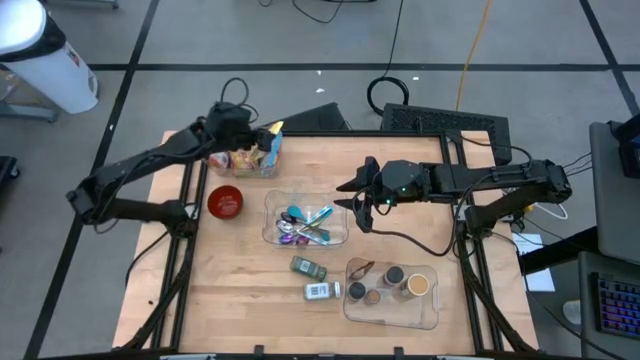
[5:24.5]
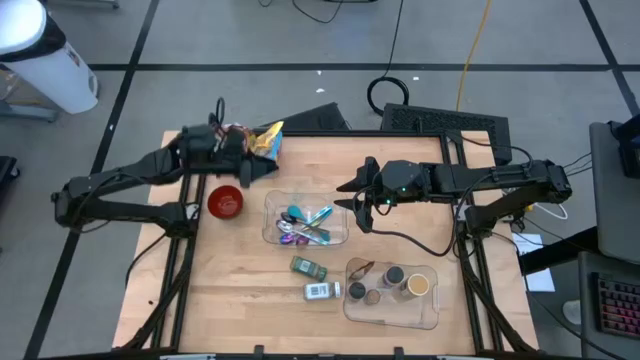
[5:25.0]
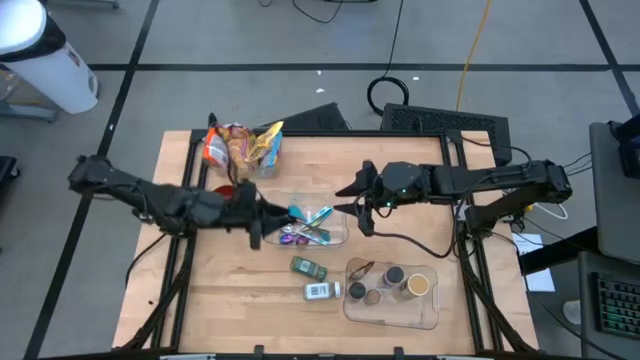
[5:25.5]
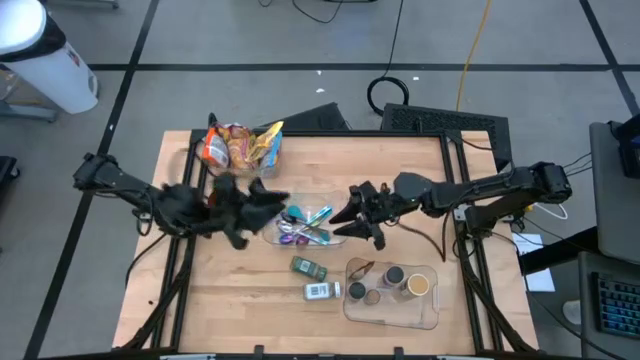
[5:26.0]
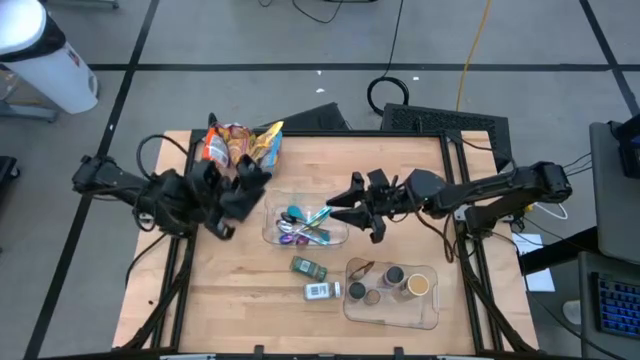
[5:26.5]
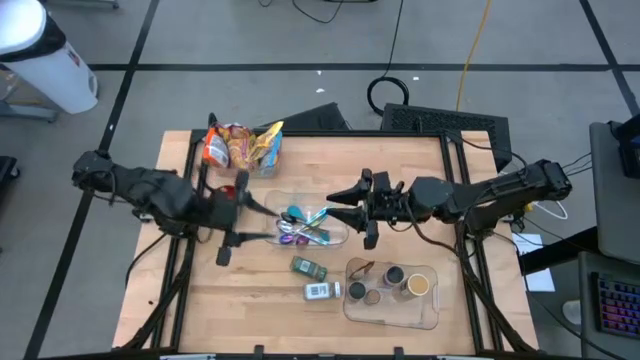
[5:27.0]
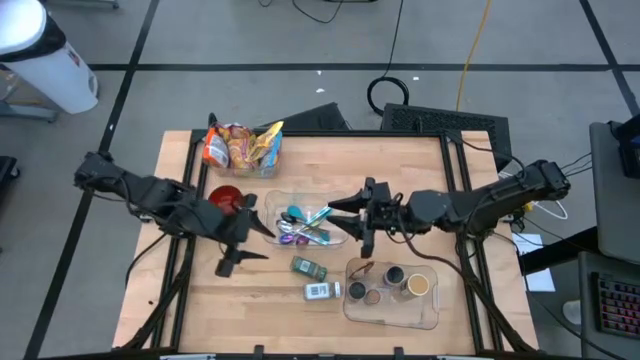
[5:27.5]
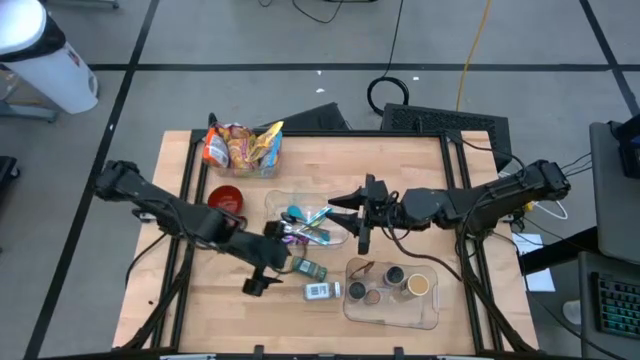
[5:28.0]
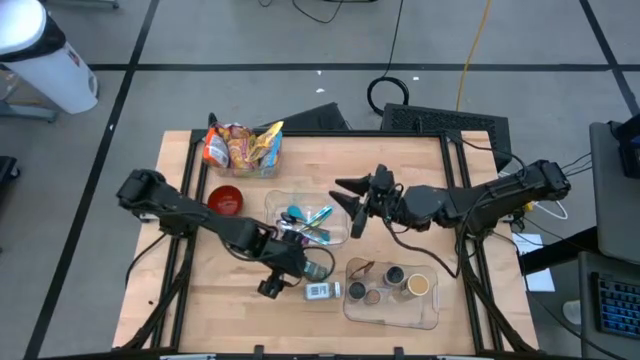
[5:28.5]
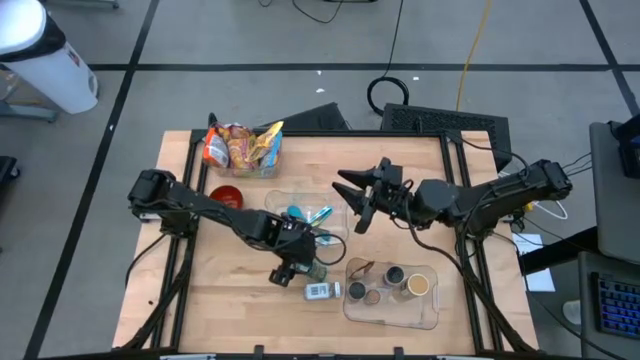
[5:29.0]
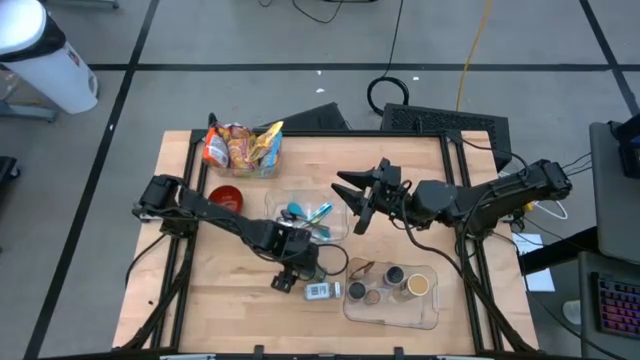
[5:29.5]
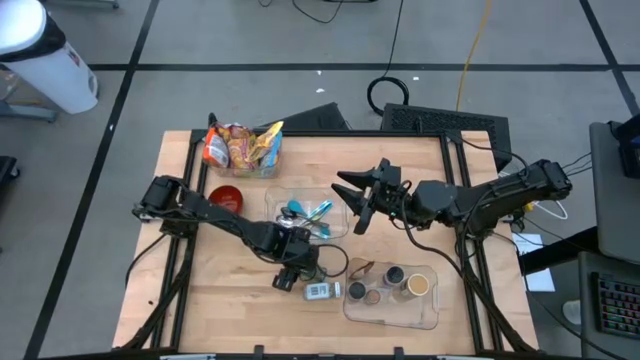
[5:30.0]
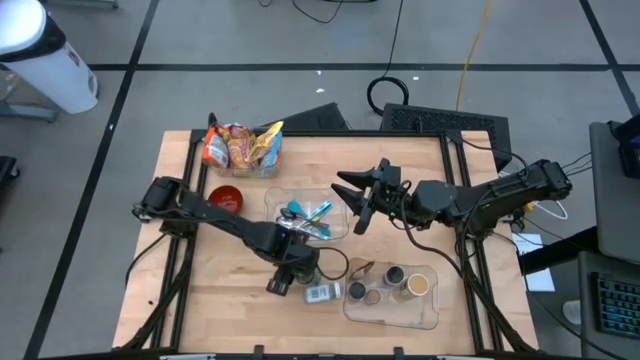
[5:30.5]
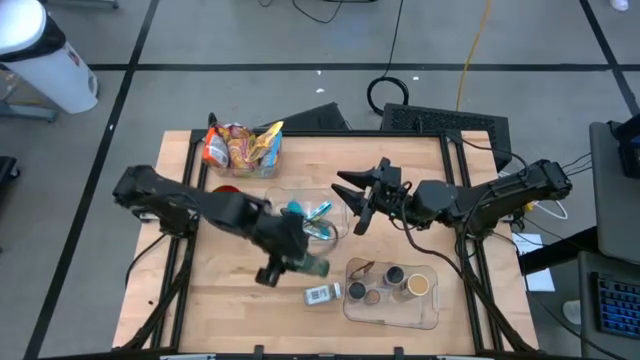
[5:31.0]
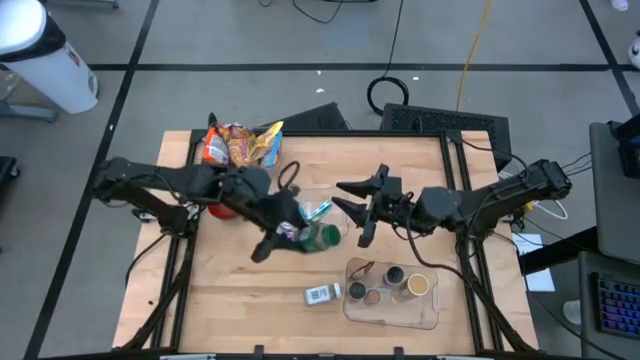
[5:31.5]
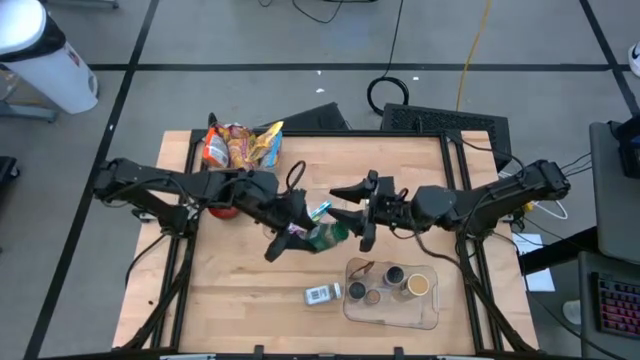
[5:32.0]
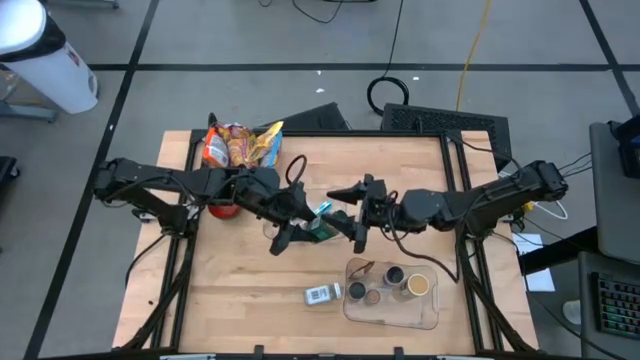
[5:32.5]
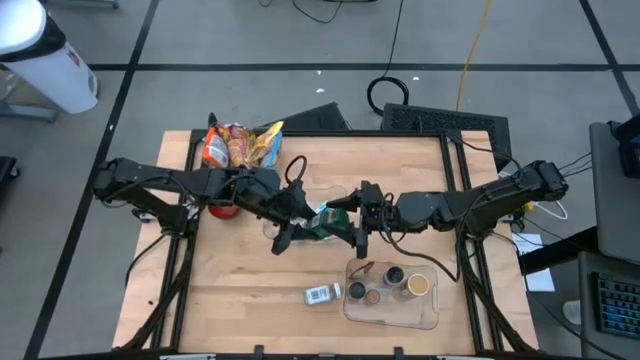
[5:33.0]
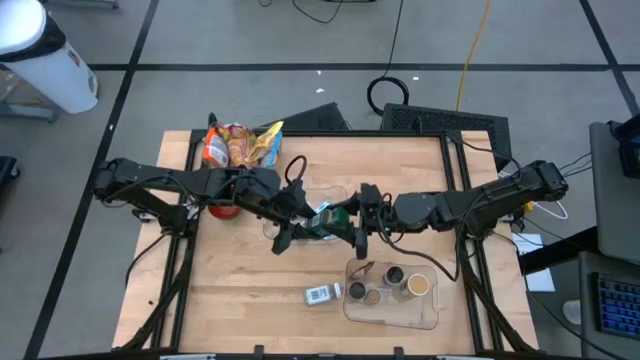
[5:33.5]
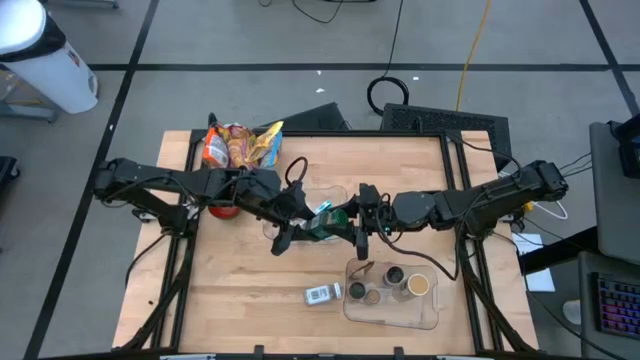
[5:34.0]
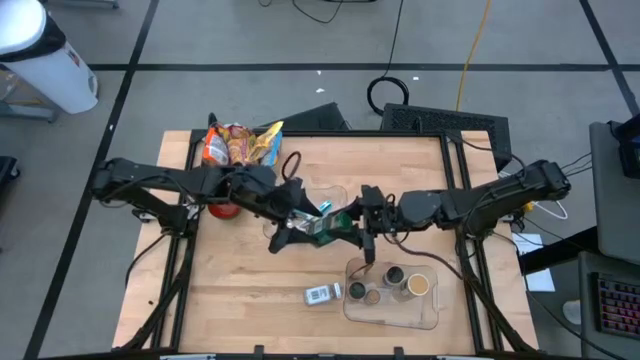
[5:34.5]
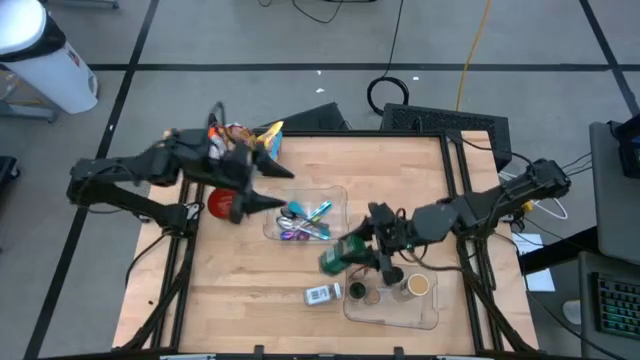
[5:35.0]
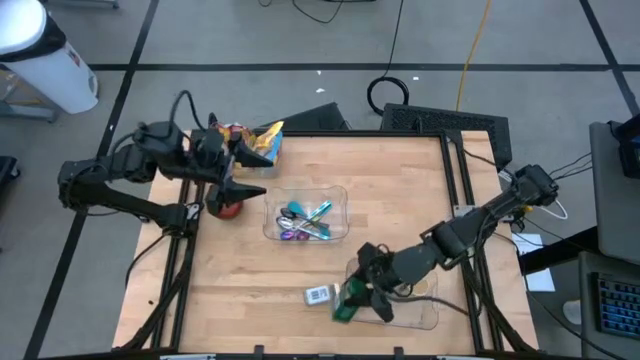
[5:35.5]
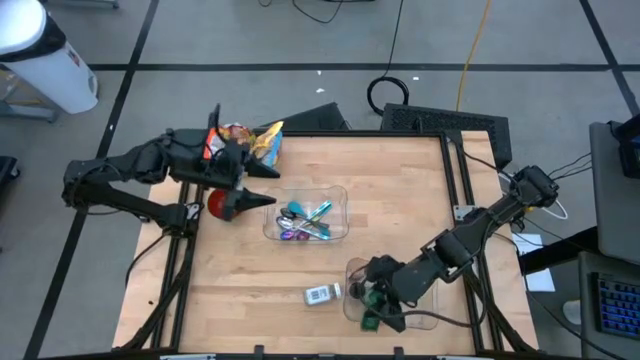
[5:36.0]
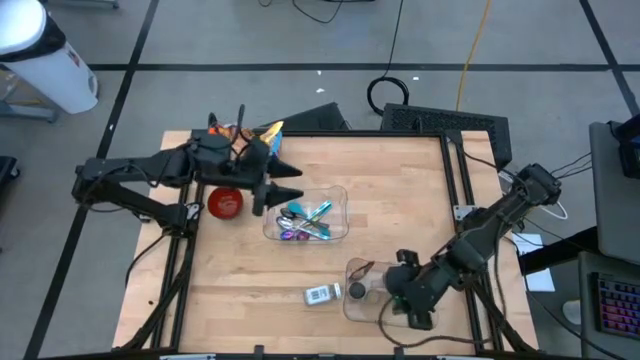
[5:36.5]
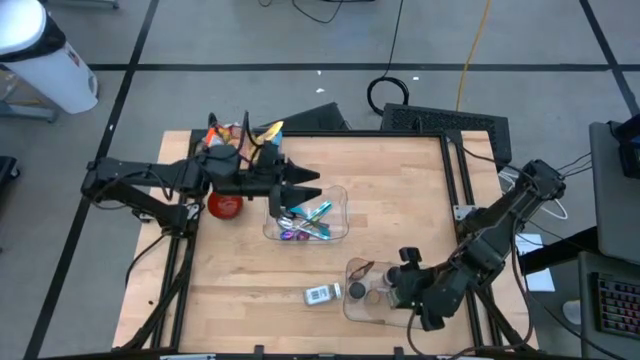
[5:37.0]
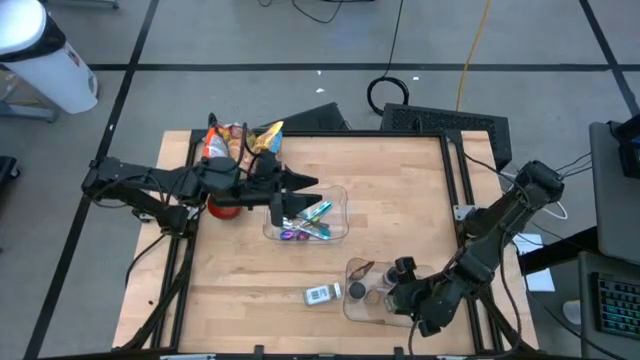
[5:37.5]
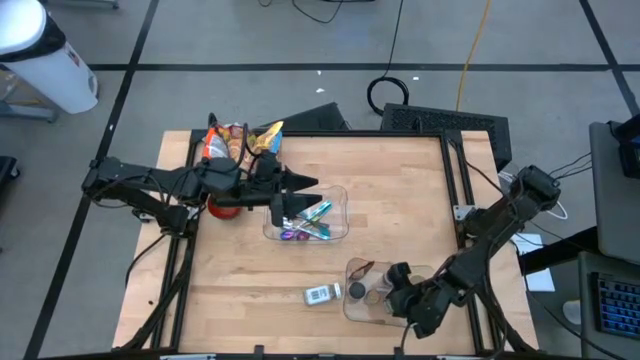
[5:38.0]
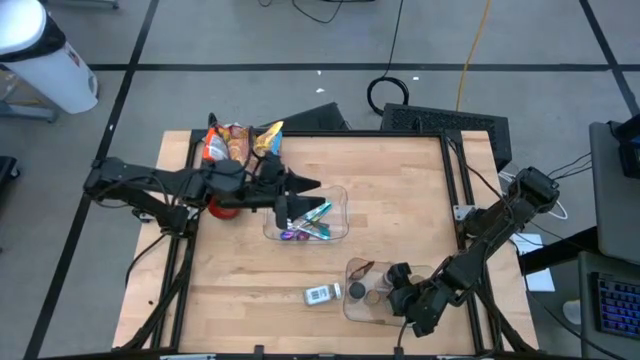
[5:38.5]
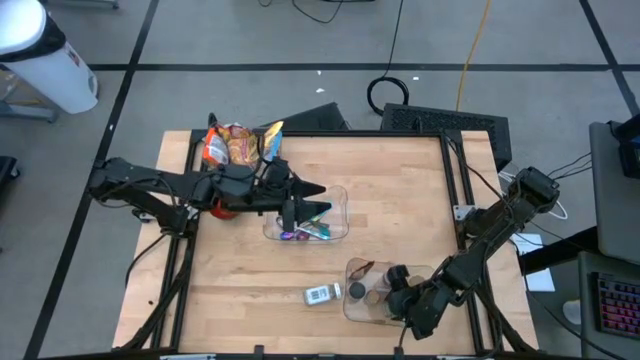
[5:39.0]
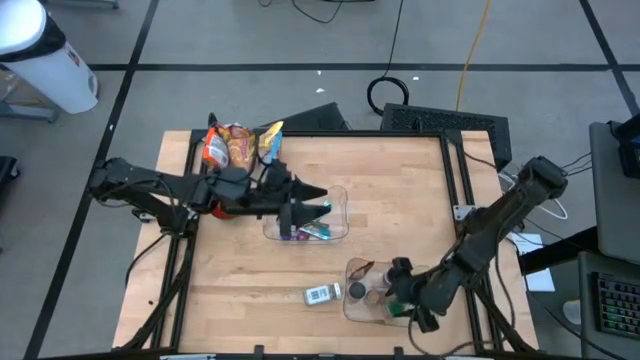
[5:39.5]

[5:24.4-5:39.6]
Task: Pick & Place Food Item
Put the green seasoning bottle into the bottom transparent bin

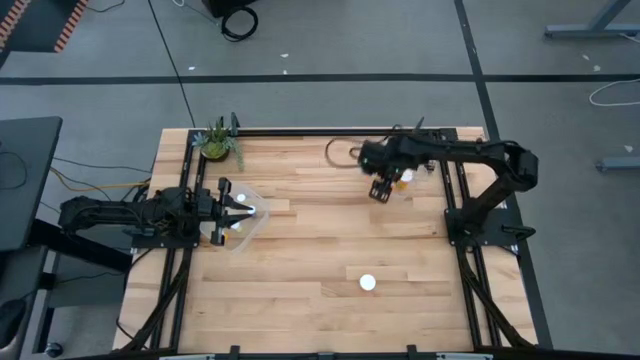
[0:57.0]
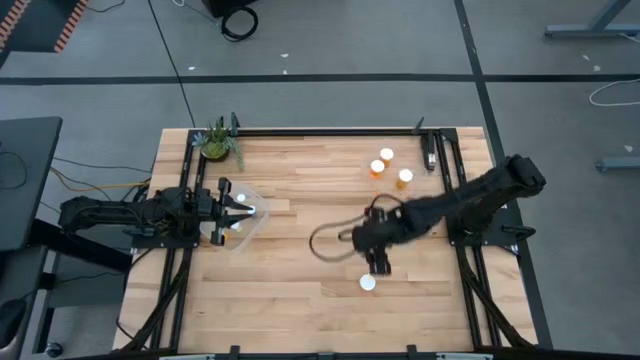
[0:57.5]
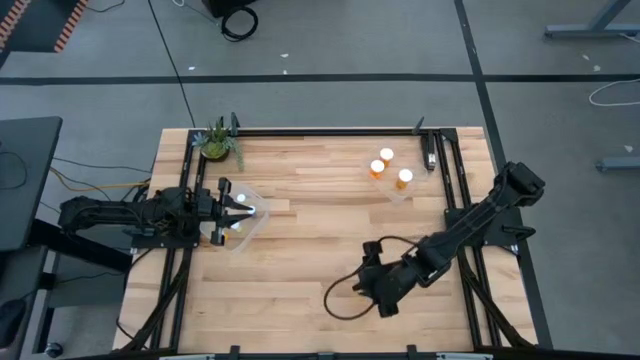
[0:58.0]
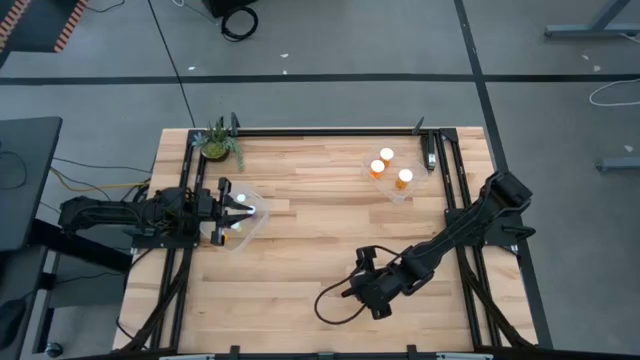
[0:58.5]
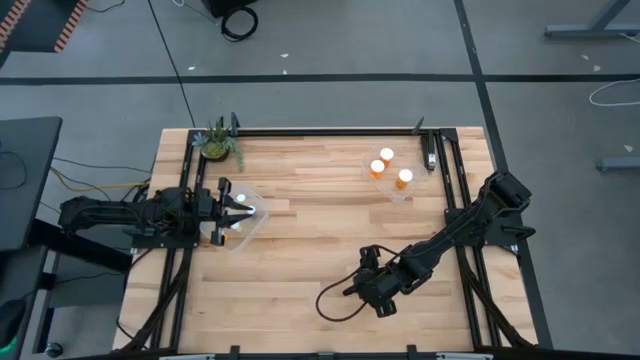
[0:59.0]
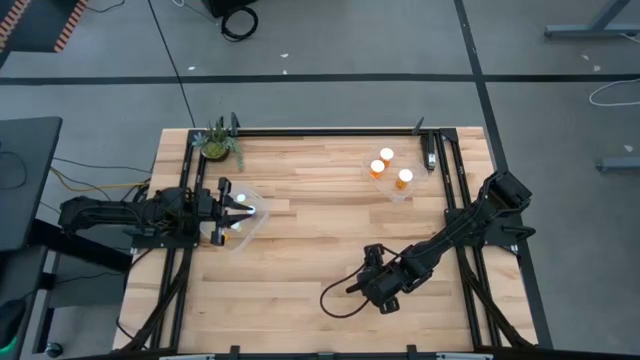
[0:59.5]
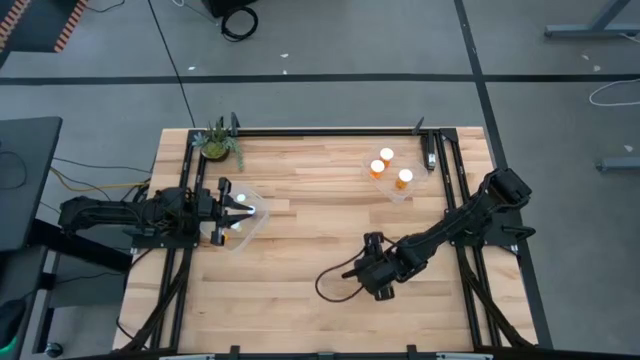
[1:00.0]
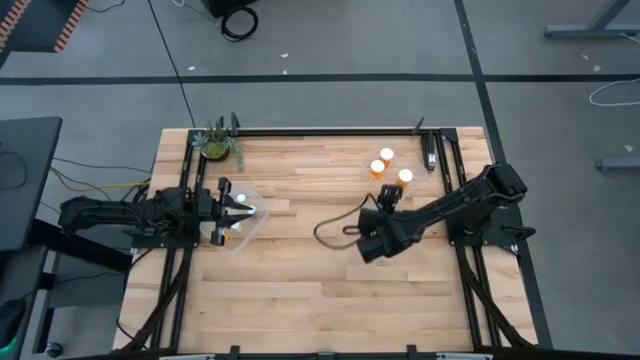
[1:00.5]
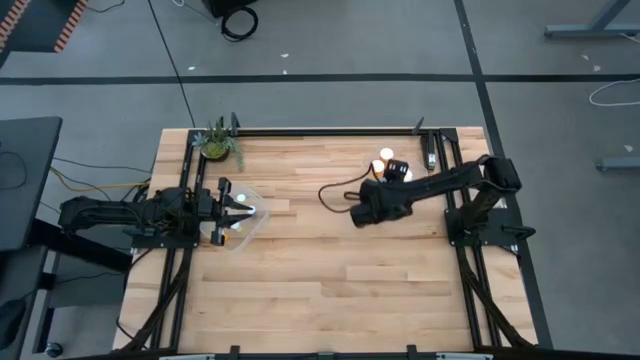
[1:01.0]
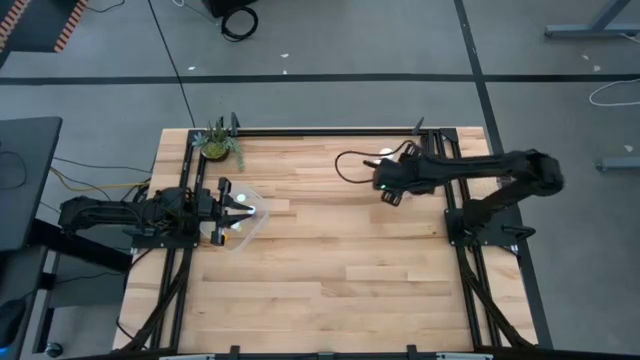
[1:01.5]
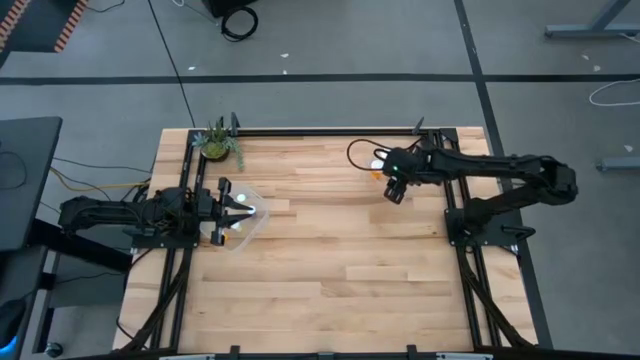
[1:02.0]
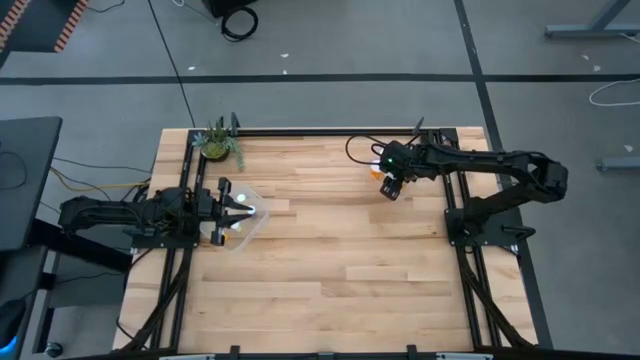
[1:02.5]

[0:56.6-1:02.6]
Task: Pick and place medicine bottles into bin by pill shape (circle, oval)
Put the large orange pill bottle into the right transparent bin
